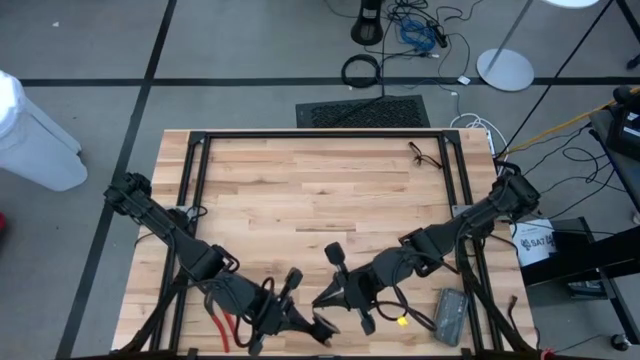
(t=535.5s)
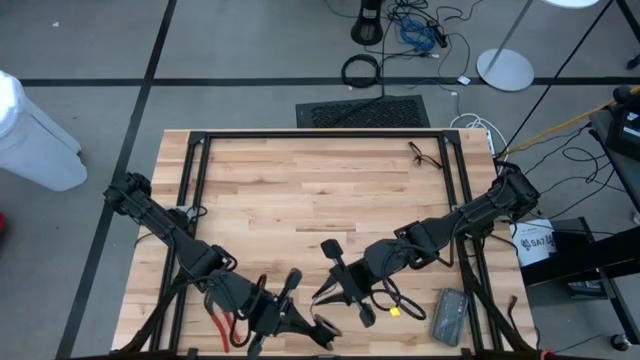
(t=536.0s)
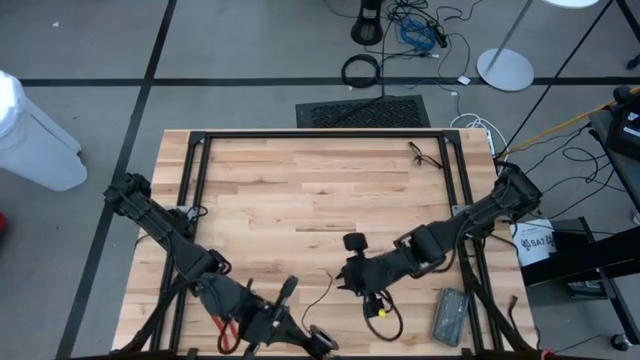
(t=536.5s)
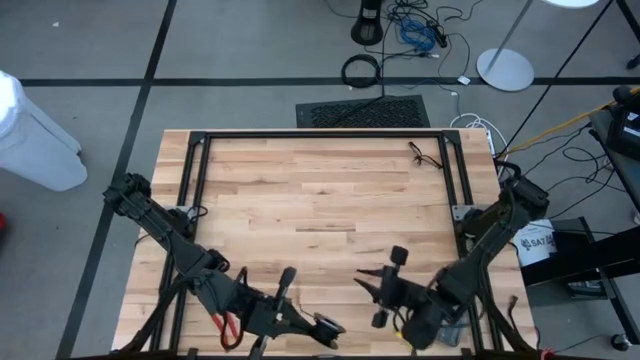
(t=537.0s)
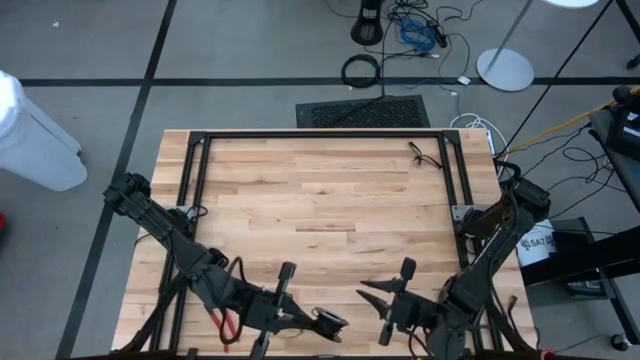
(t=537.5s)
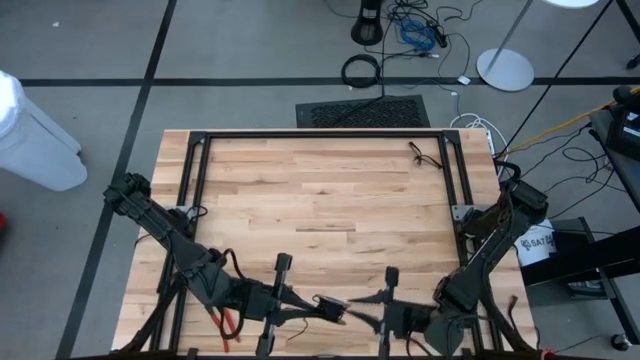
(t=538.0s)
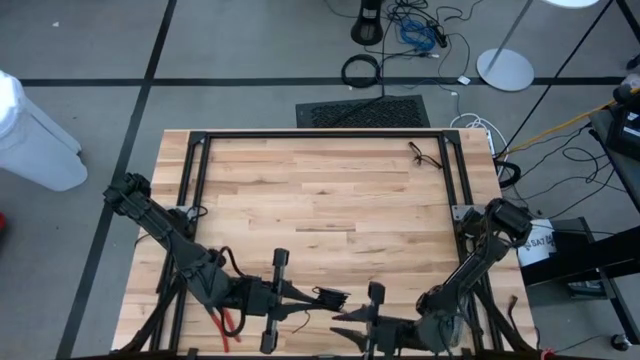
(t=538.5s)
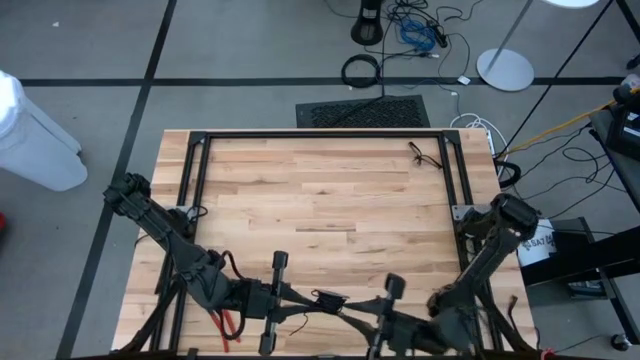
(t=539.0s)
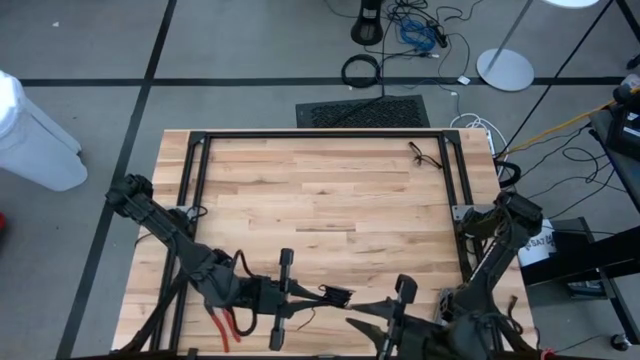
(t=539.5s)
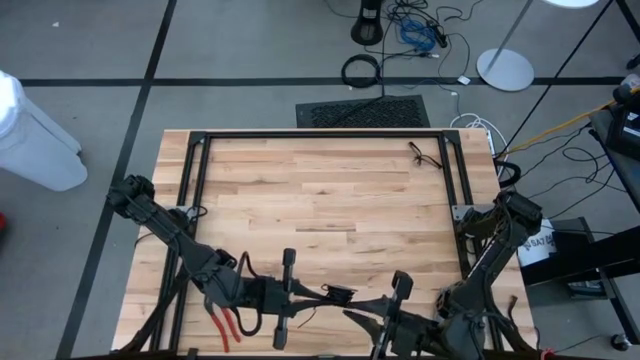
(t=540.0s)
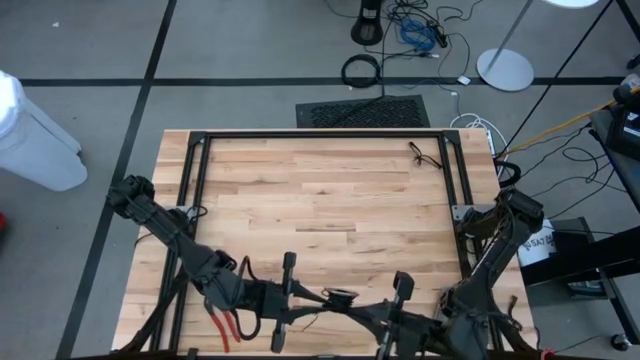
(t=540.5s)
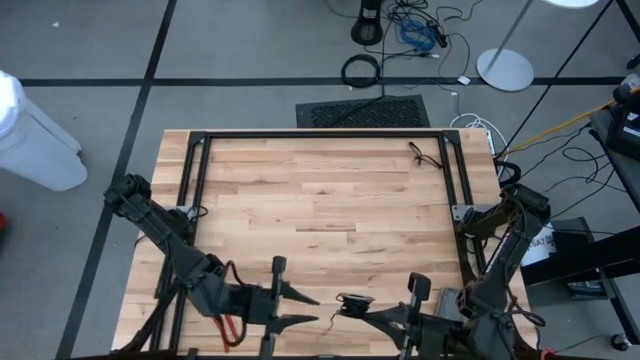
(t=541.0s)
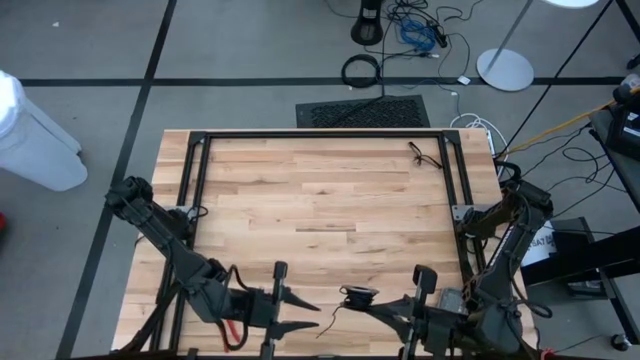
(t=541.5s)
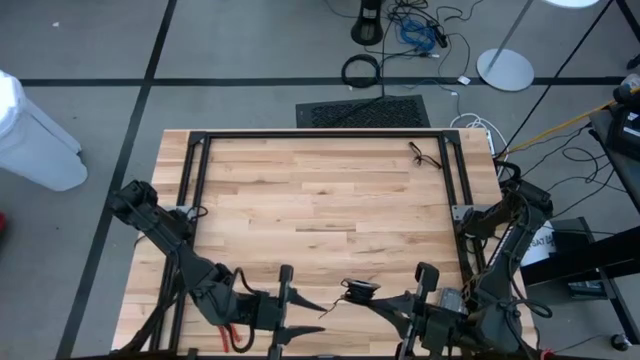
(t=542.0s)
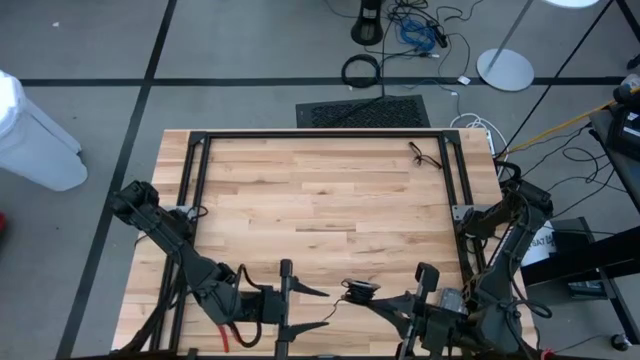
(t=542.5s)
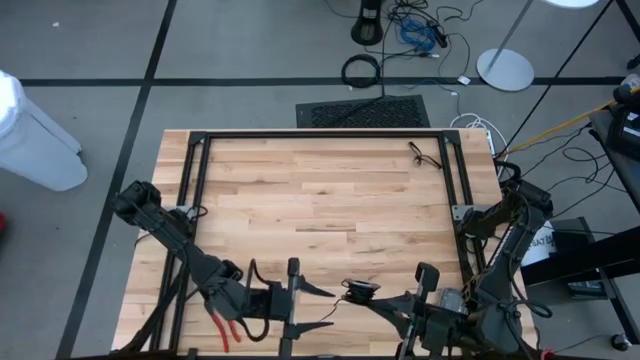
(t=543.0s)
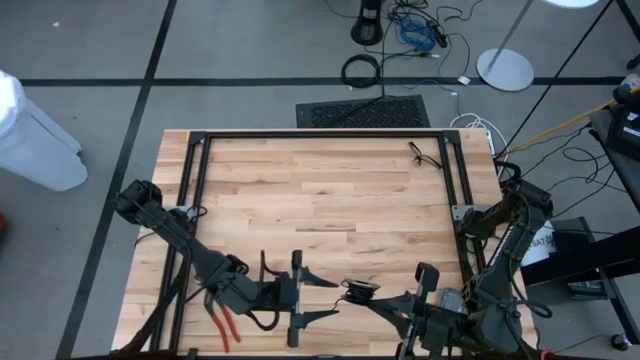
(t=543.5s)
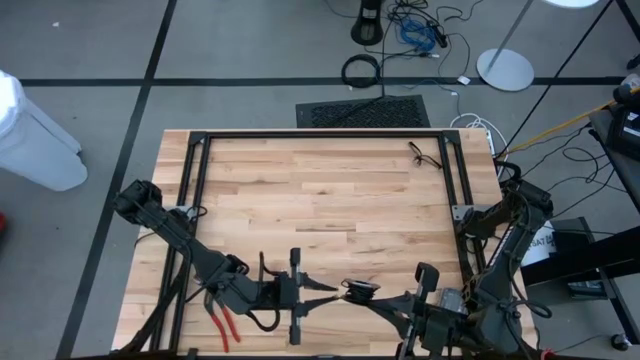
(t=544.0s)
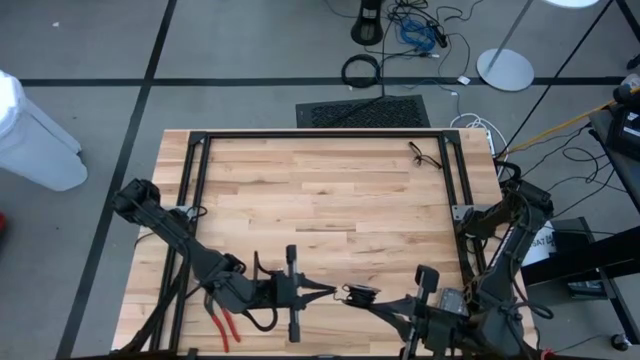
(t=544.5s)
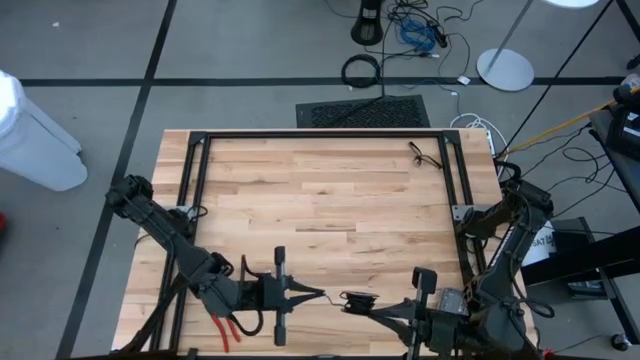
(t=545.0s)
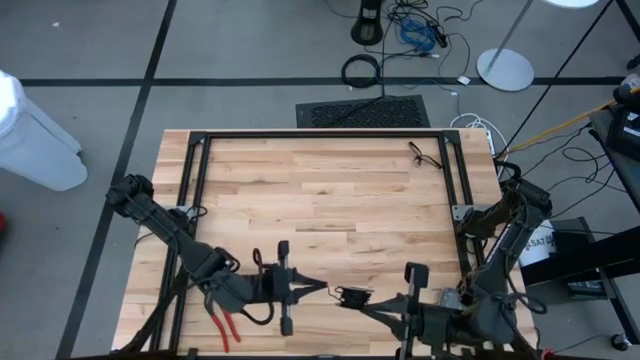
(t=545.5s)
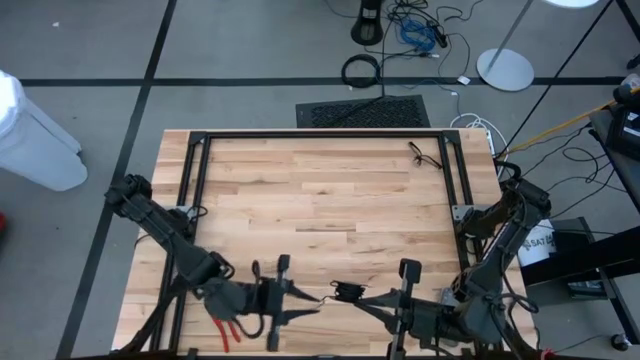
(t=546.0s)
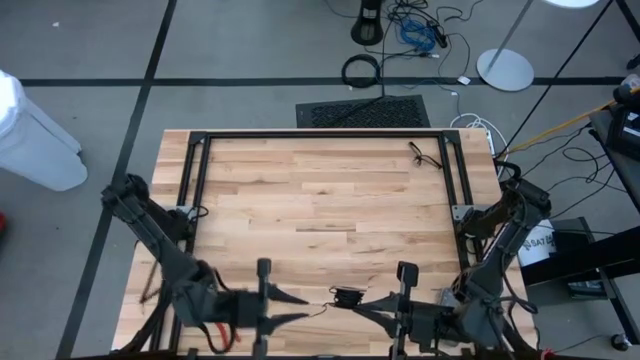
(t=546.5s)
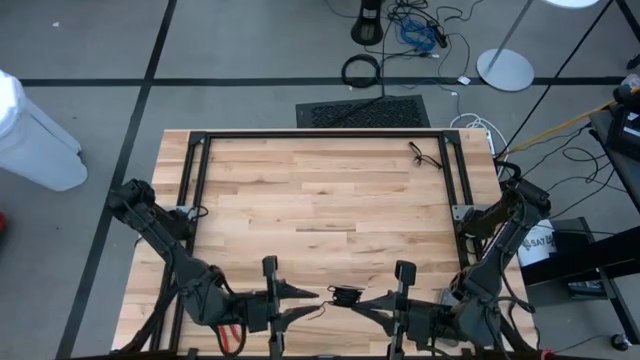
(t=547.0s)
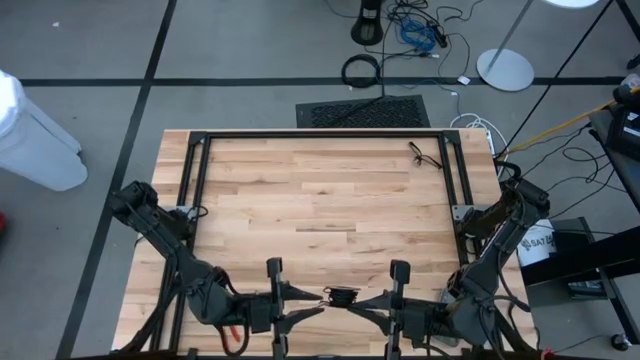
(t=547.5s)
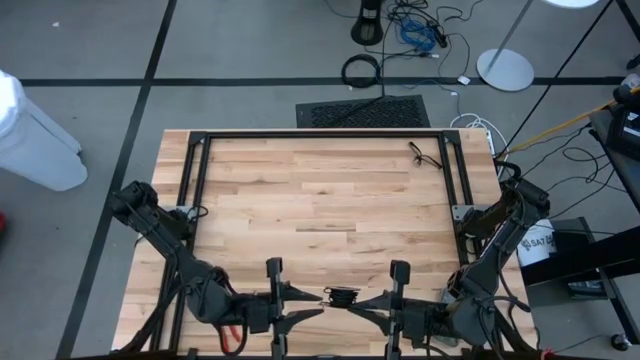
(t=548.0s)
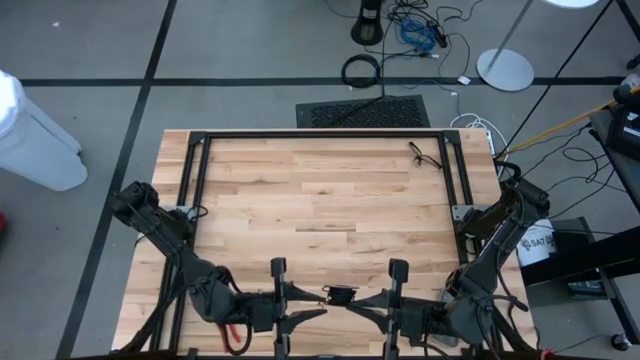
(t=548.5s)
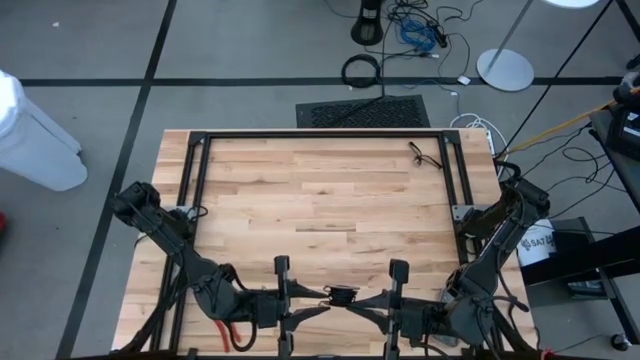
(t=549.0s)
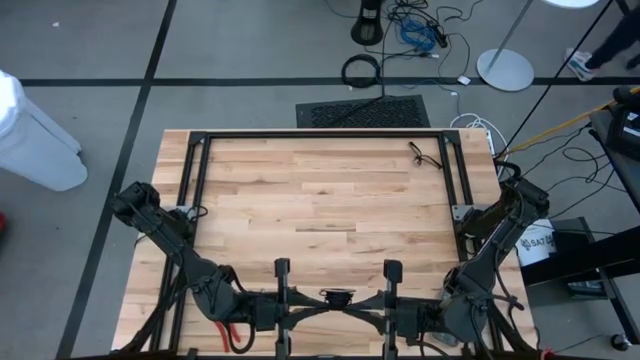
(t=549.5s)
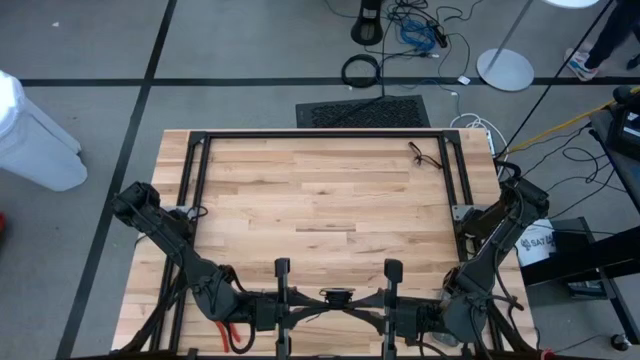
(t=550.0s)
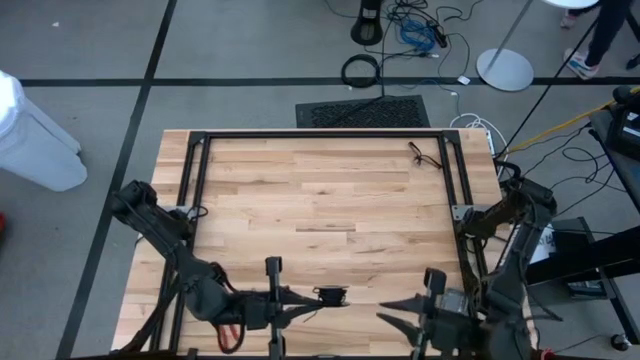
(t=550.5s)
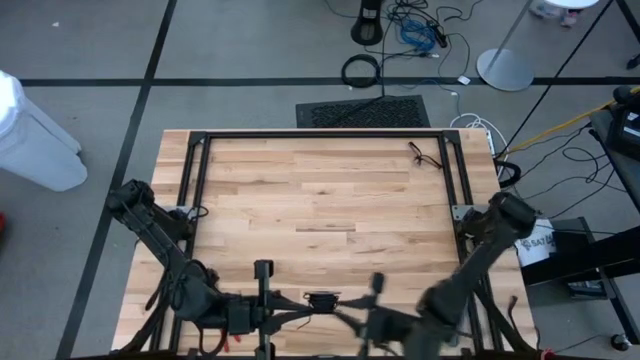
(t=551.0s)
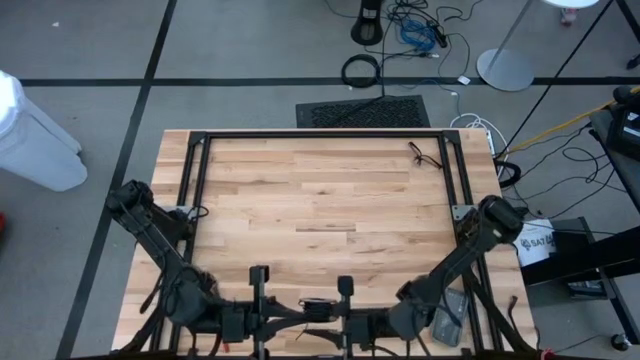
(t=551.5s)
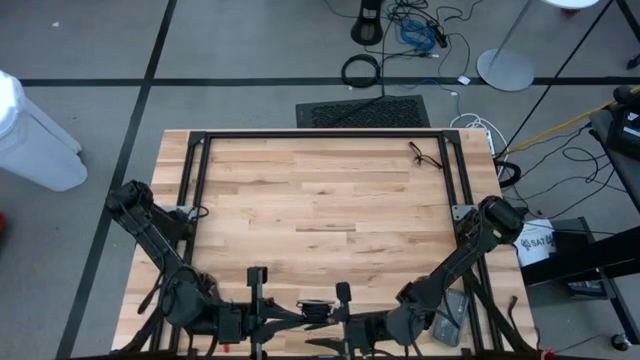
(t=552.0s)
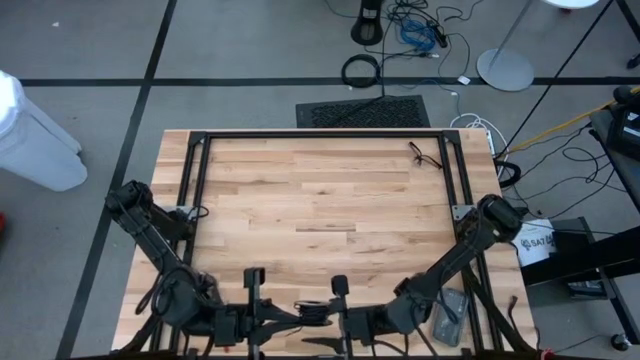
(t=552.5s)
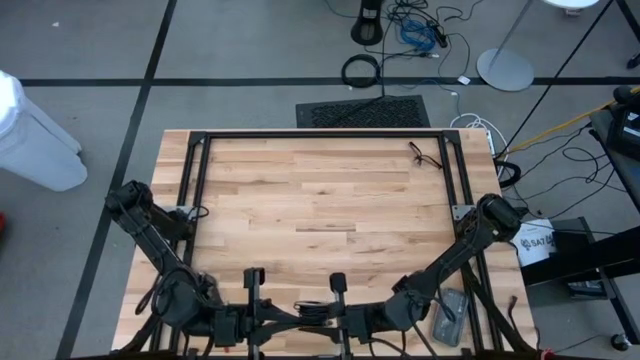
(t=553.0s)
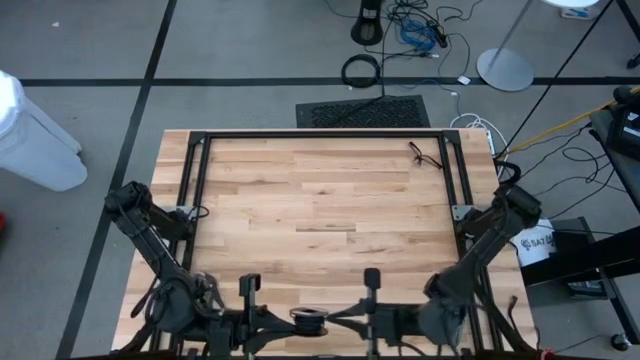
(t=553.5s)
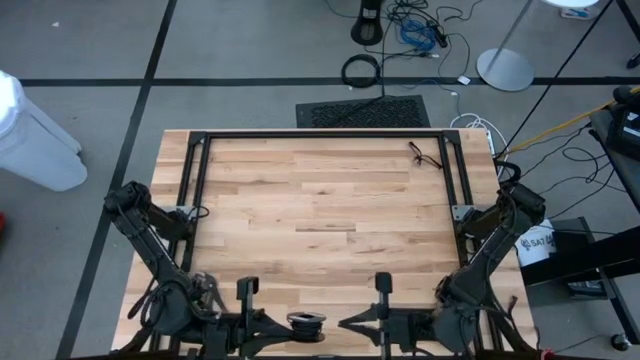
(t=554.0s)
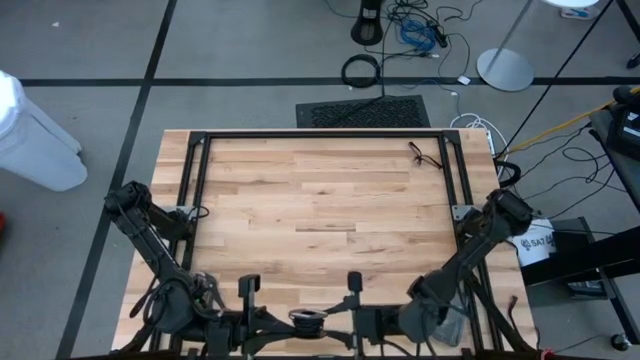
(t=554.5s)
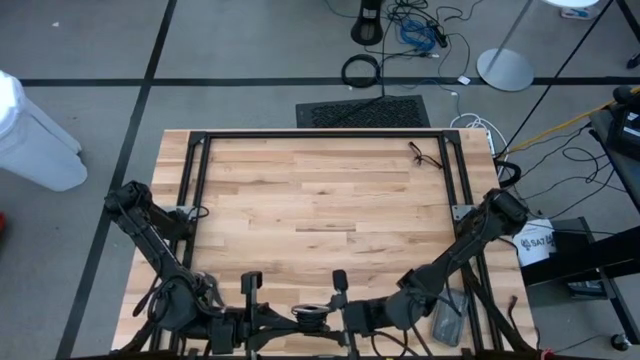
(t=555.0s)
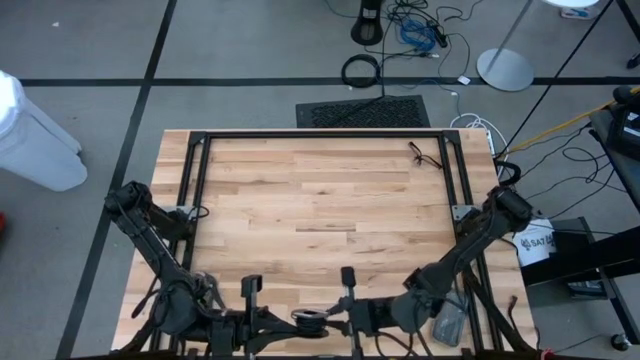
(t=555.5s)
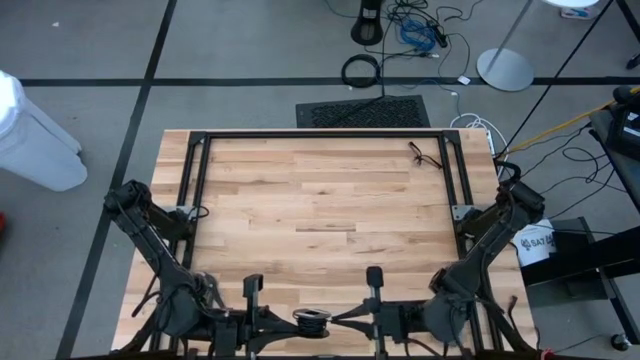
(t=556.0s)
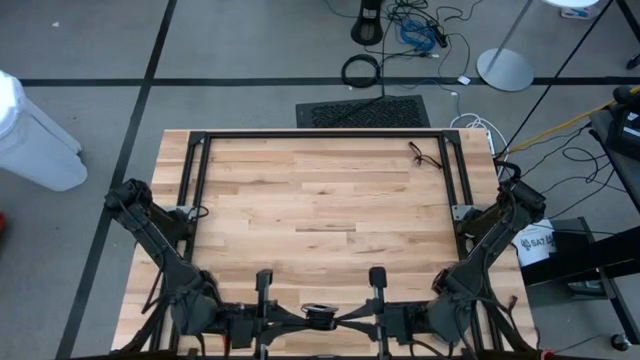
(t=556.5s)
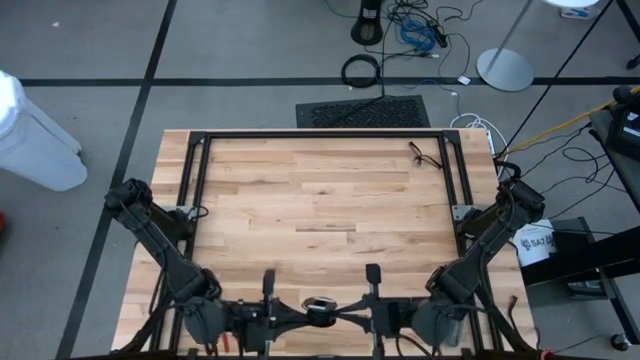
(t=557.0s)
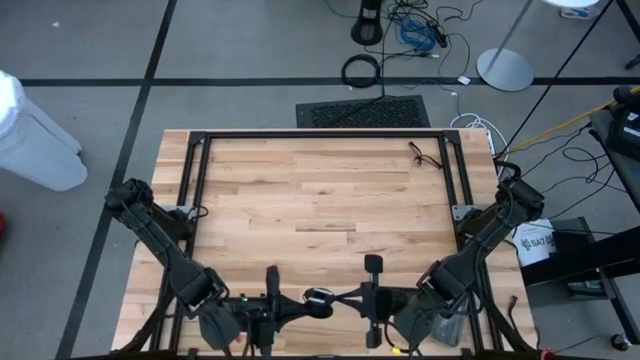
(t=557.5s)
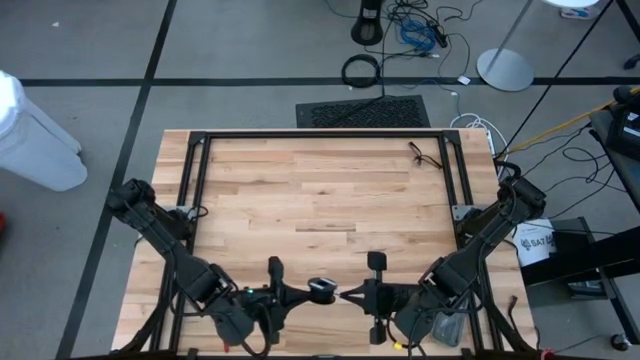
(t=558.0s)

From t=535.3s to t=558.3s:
Task: Coil cords
Coil the black wire onto the black spool
